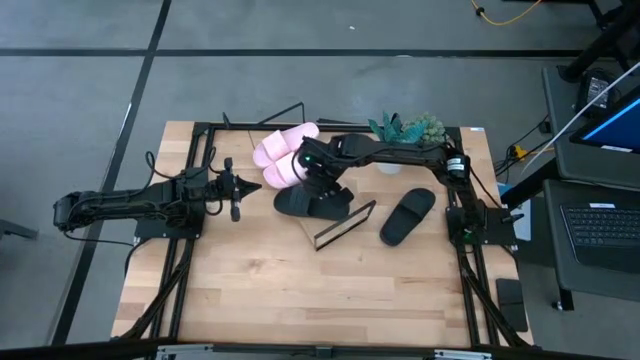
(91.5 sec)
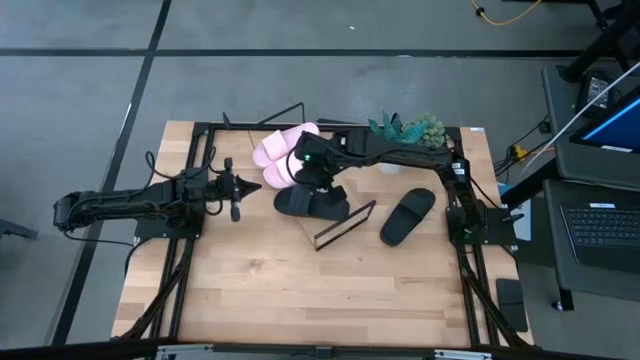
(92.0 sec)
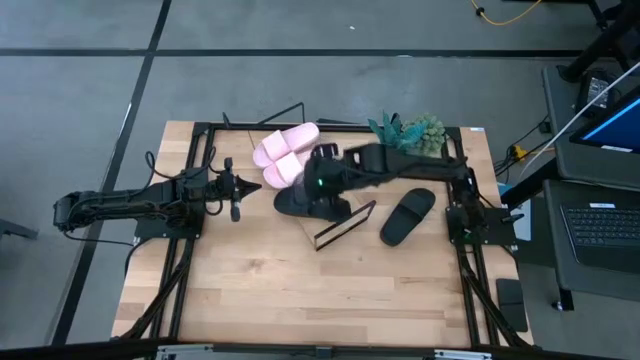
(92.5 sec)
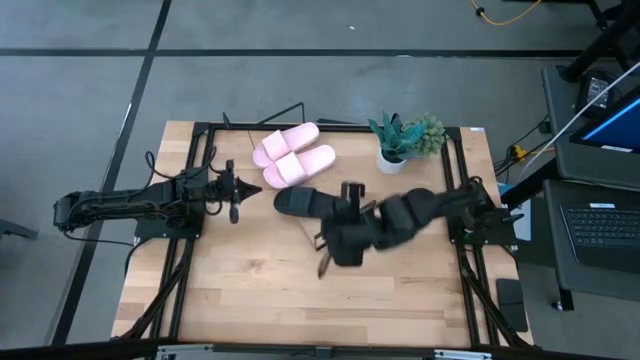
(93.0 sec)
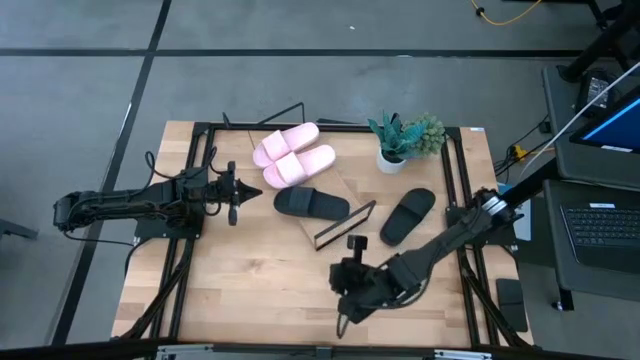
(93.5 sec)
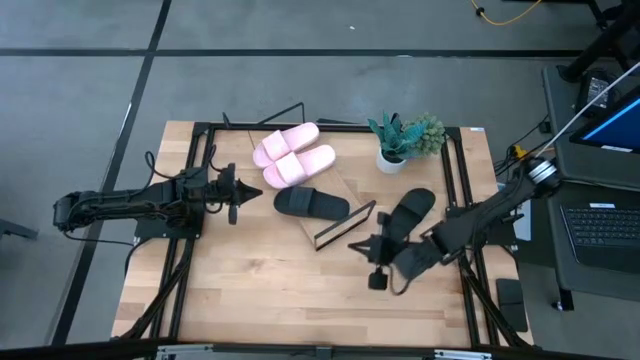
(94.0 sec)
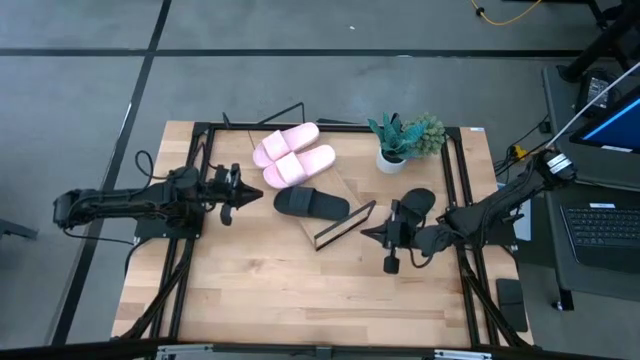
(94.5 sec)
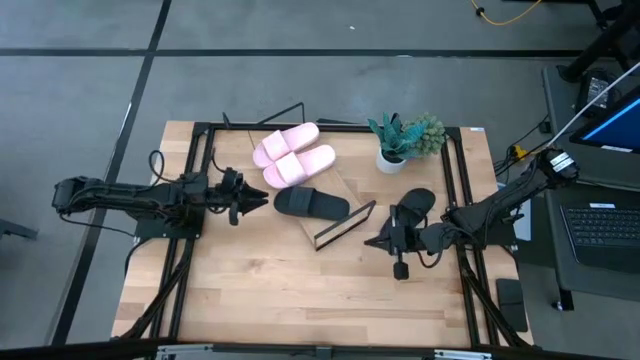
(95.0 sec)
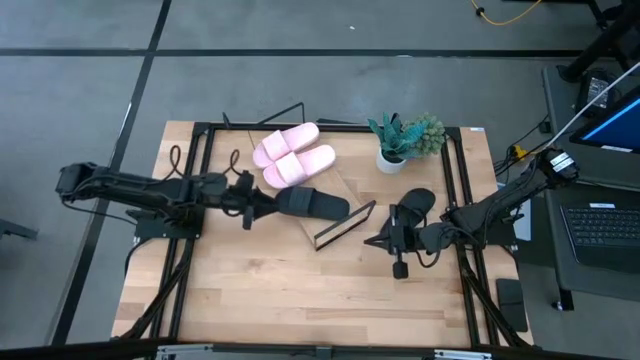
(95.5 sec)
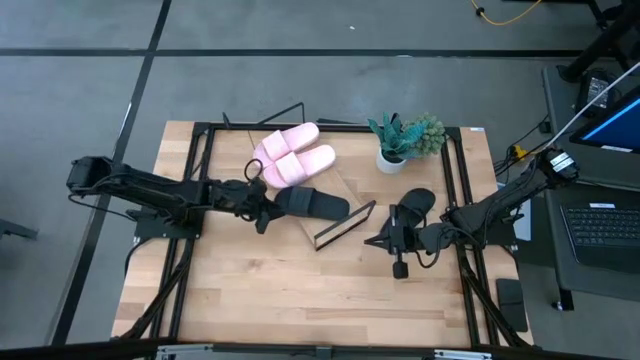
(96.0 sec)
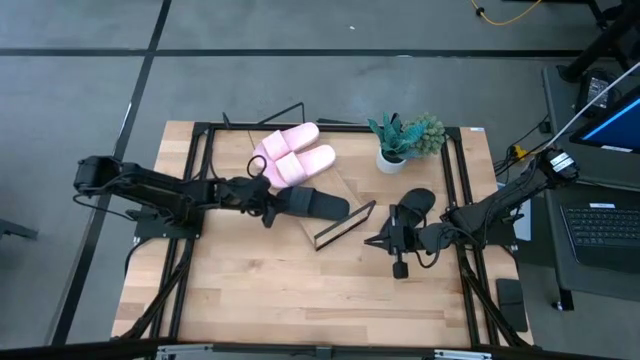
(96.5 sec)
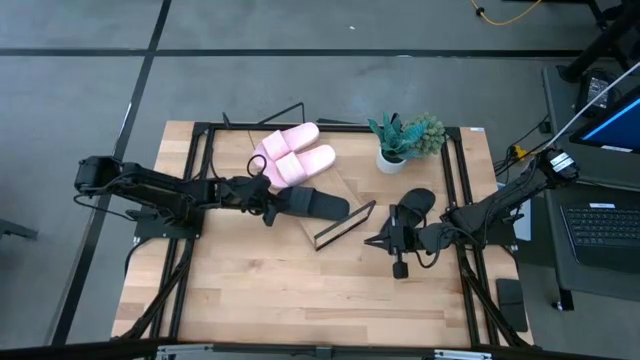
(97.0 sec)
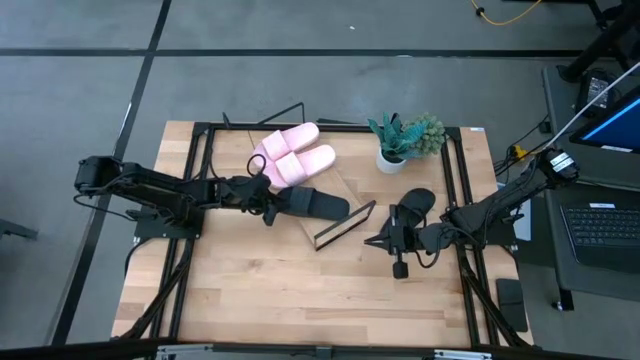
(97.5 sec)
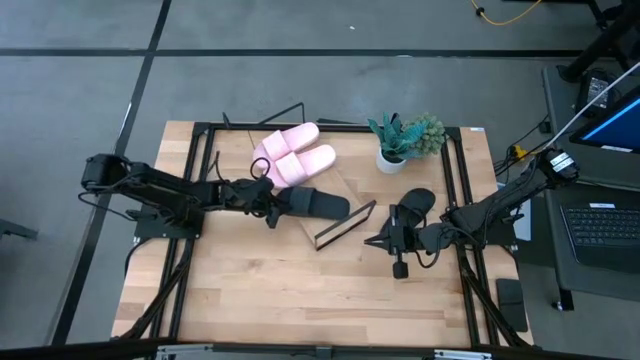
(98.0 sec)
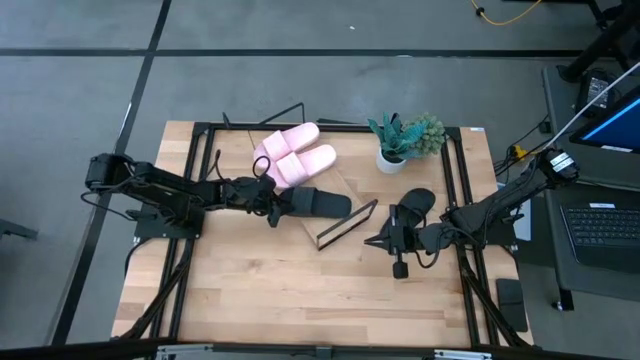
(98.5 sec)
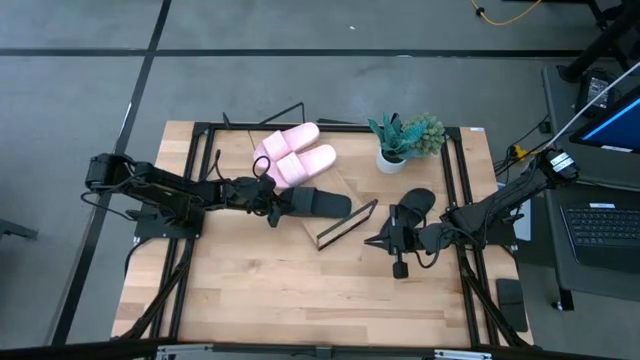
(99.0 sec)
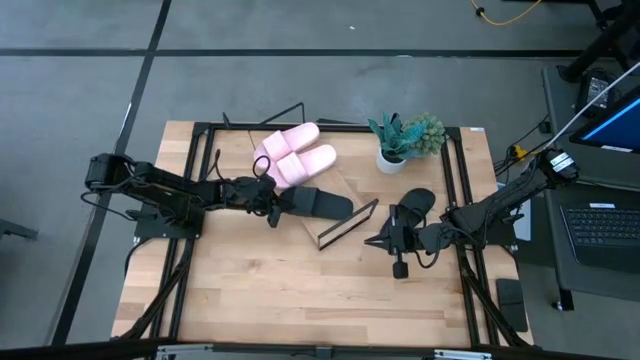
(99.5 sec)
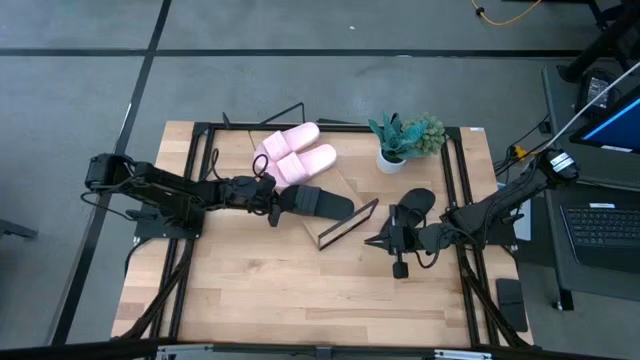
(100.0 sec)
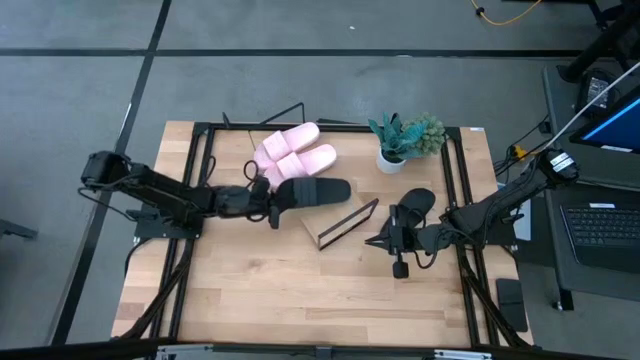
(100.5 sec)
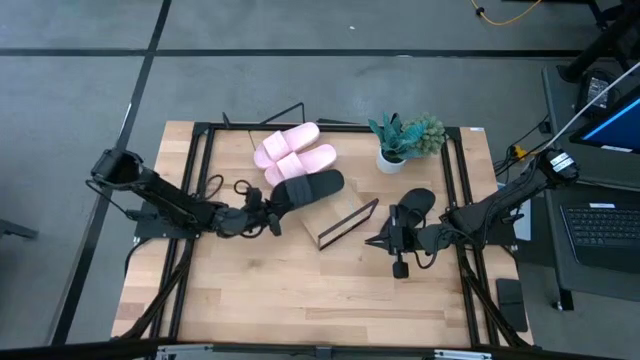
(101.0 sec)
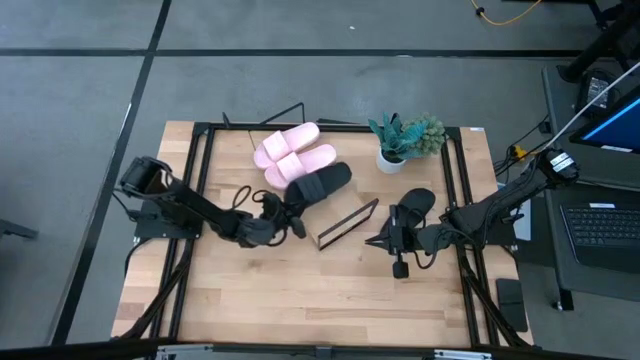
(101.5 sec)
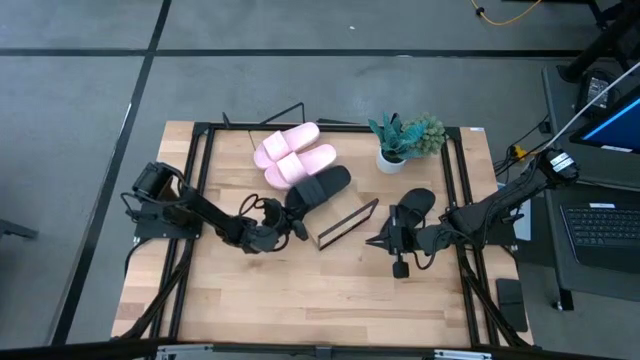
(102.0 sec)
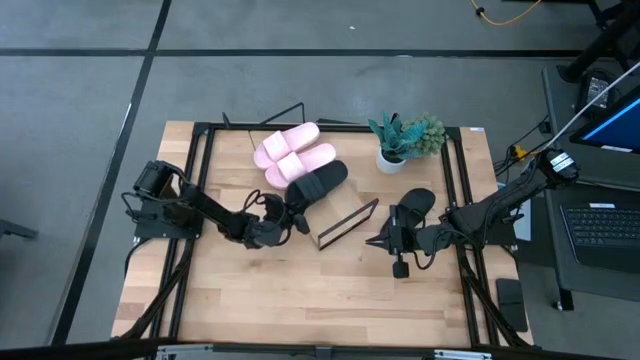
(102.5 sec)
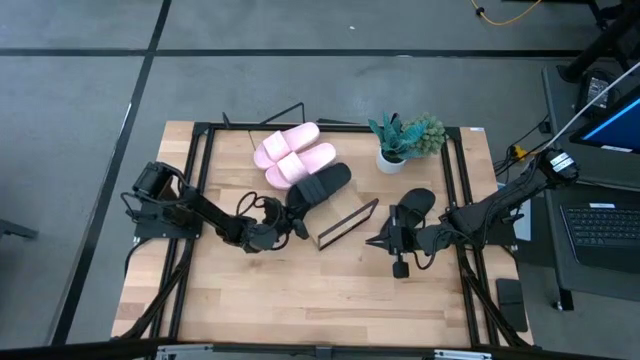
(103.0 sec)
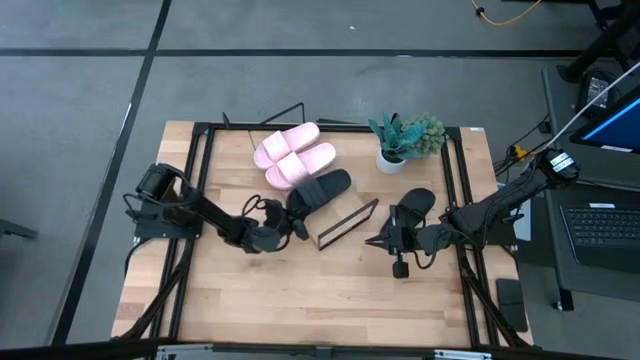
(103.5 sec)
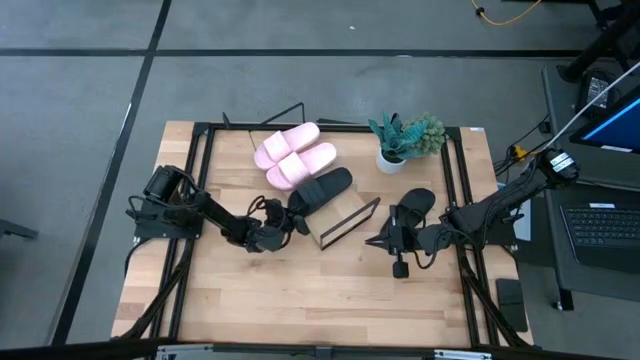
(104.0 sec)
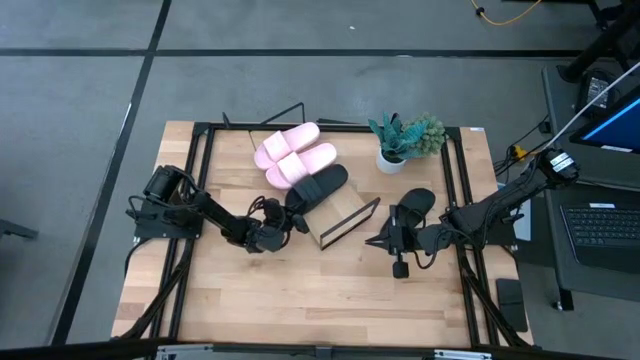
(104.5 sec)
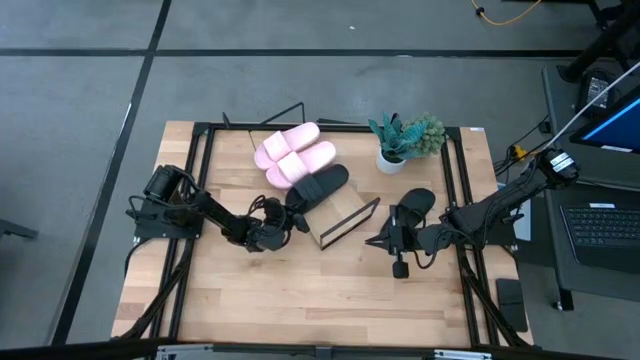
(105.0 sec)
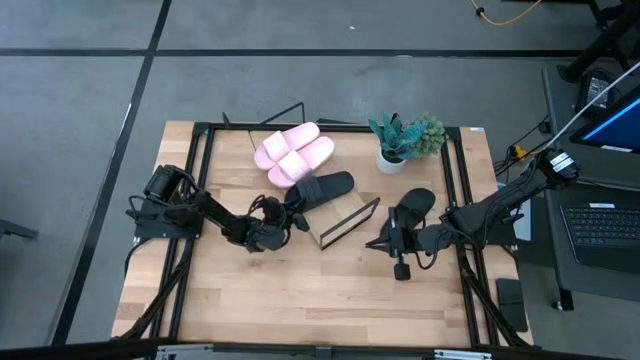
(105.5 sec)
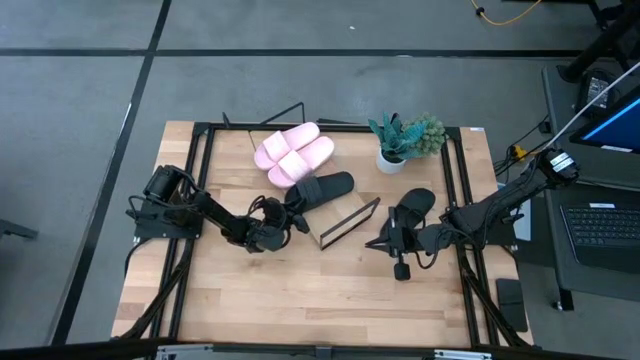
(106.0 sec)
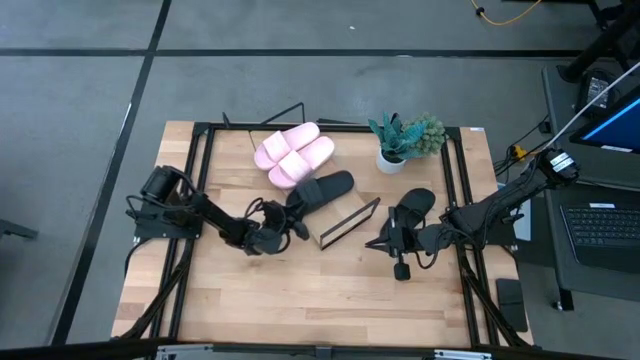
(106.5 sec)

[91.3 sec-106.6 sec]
Task: Pick and place slides into the shelf
Adjust the black slides on the shelf

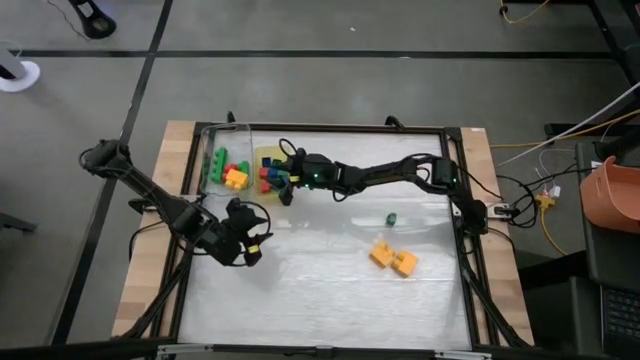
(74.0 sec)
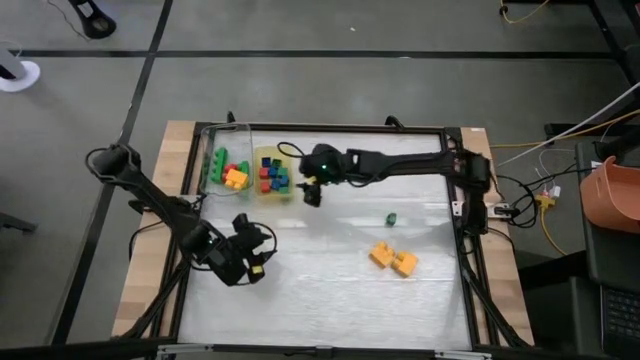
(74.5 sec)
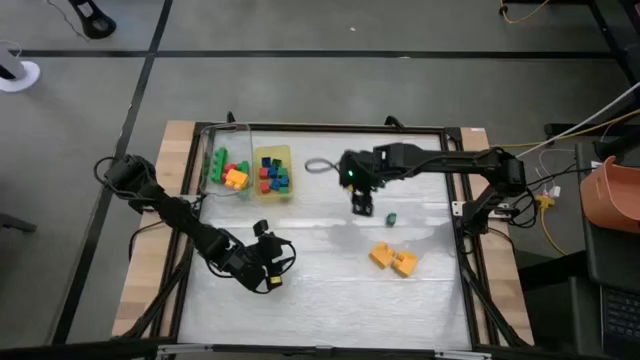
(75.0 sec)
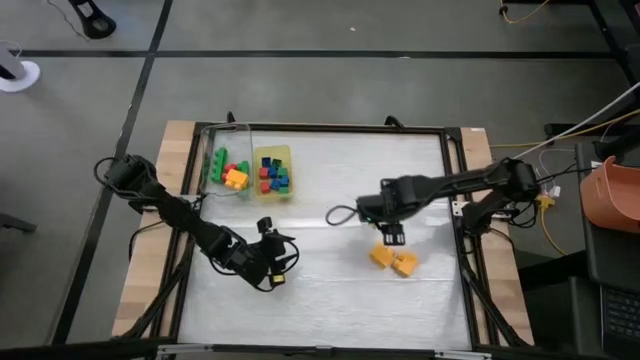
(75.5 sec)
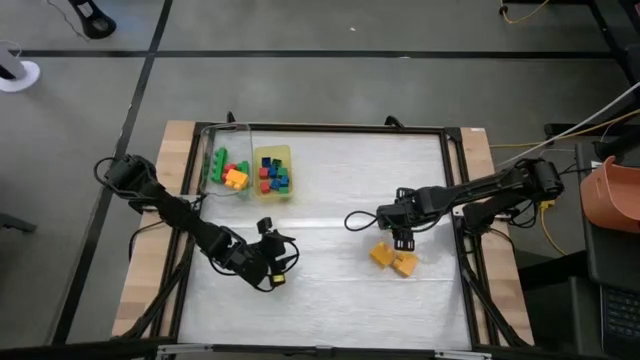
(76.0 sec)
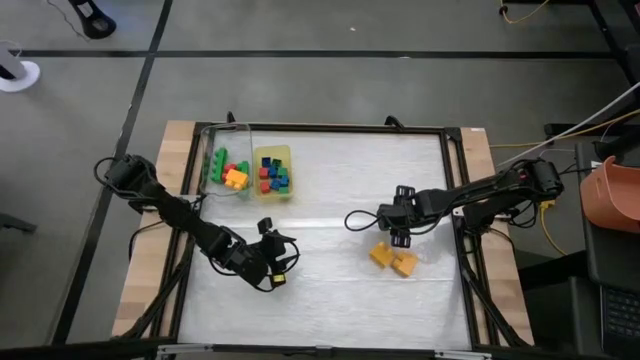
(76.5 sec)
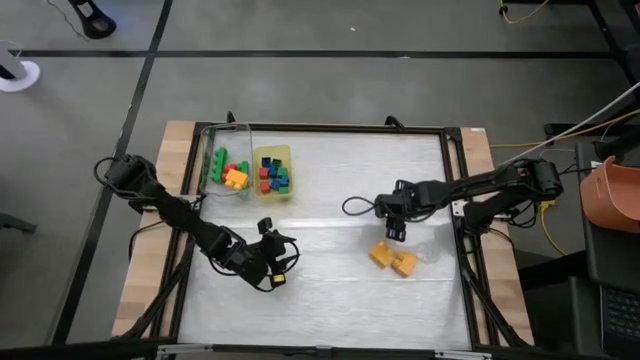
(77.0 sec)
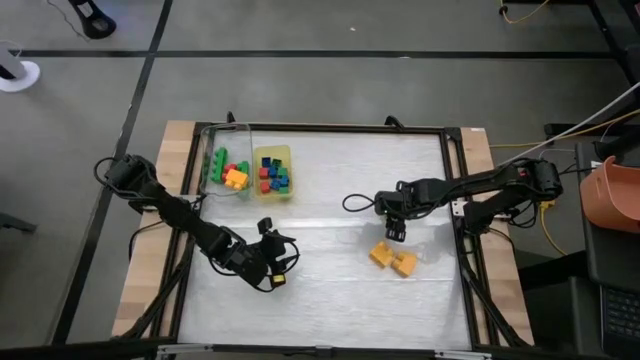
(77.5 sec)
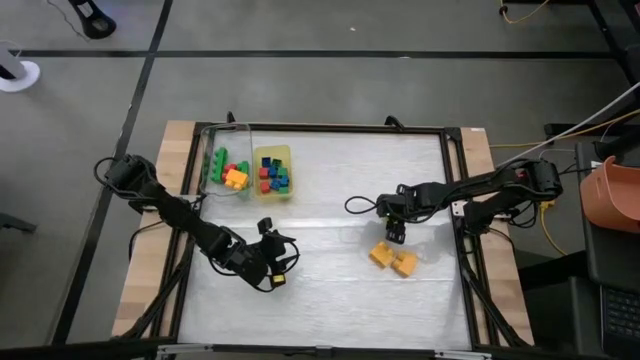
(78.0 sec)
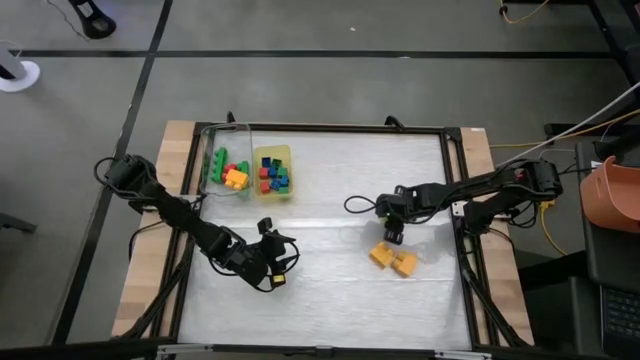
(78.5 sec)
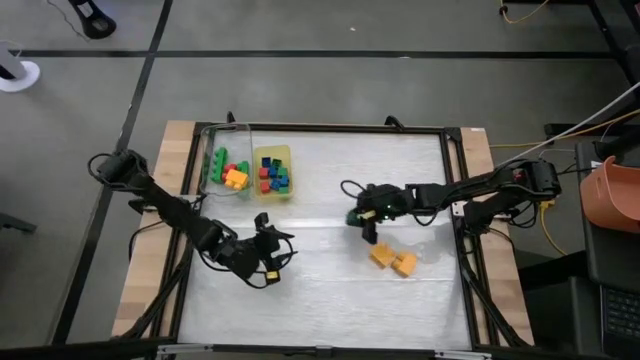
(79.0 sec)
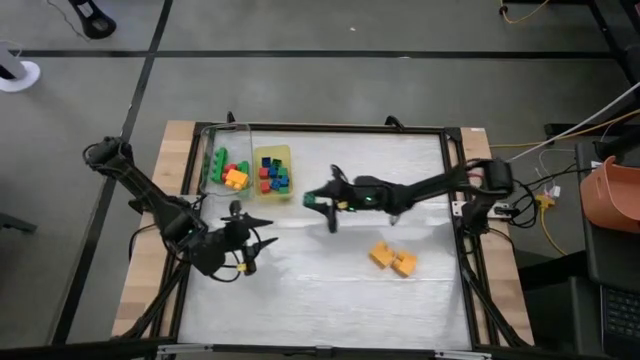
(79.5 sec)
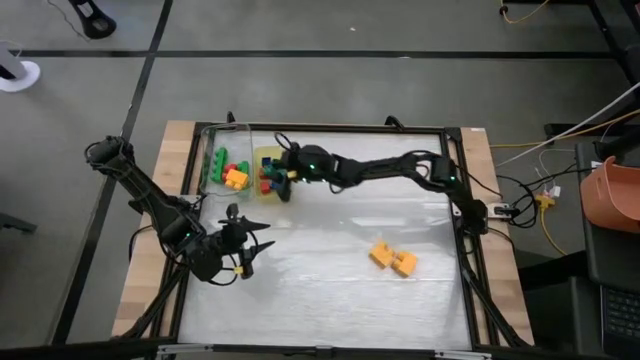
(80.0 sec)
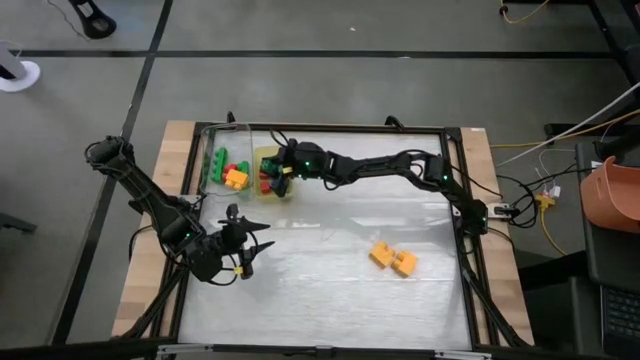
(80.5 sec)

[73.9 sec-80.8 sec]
Task: Sort blocks by size
Put the small green game piece into the yellow bin
